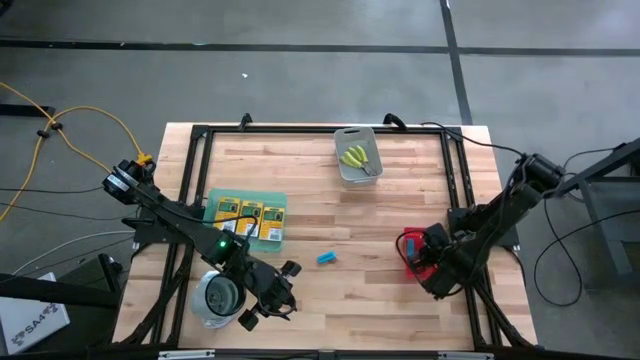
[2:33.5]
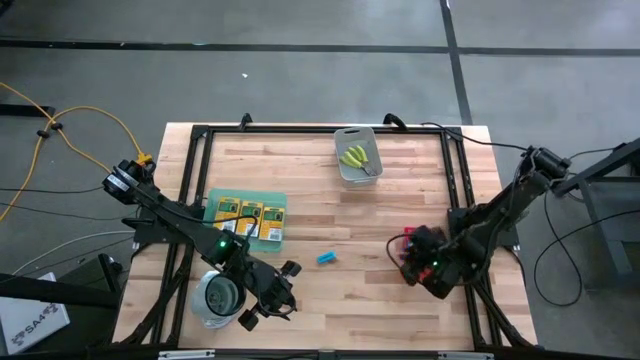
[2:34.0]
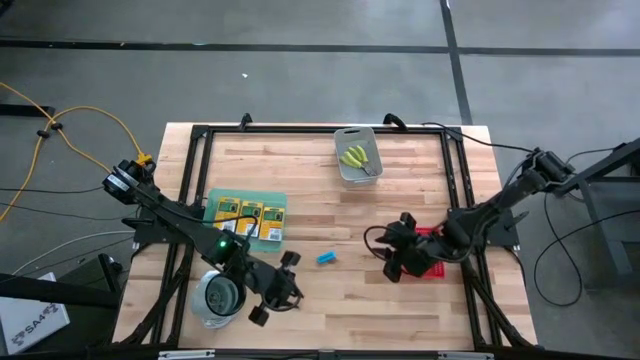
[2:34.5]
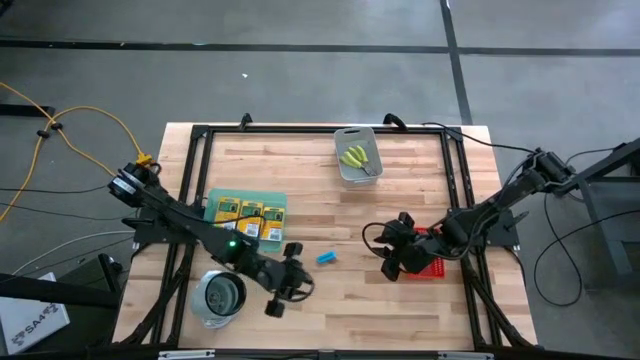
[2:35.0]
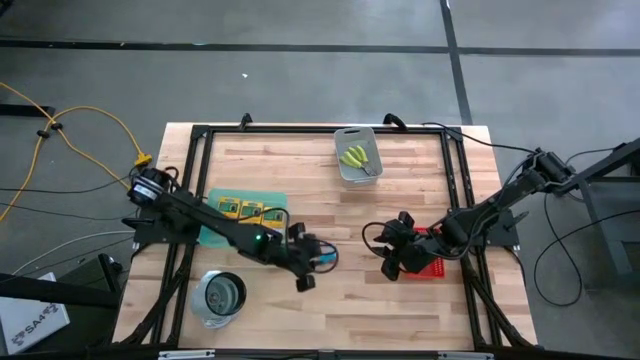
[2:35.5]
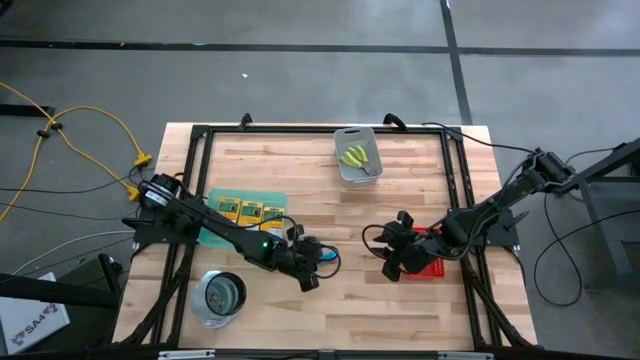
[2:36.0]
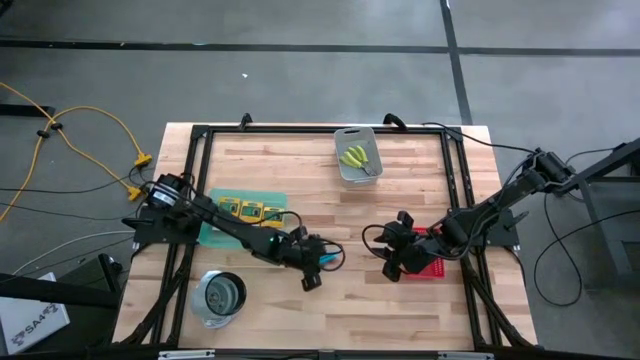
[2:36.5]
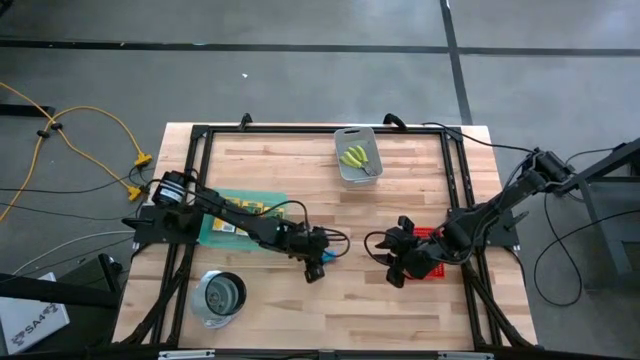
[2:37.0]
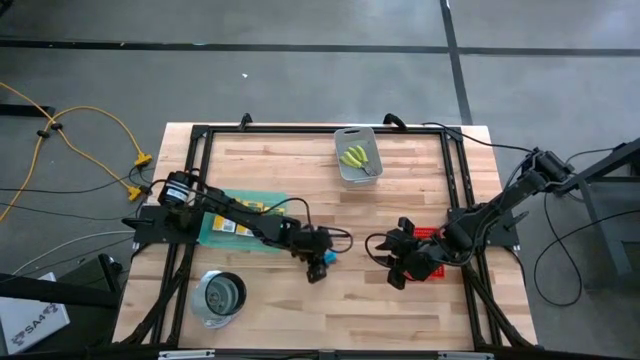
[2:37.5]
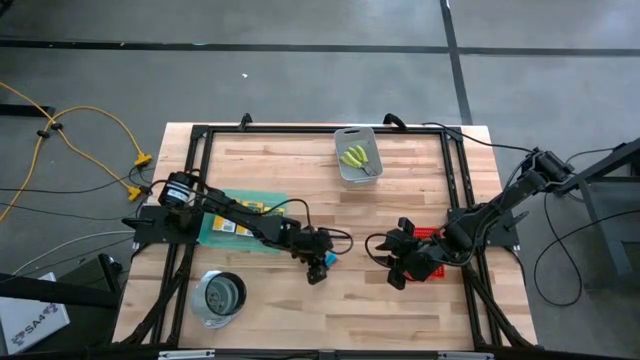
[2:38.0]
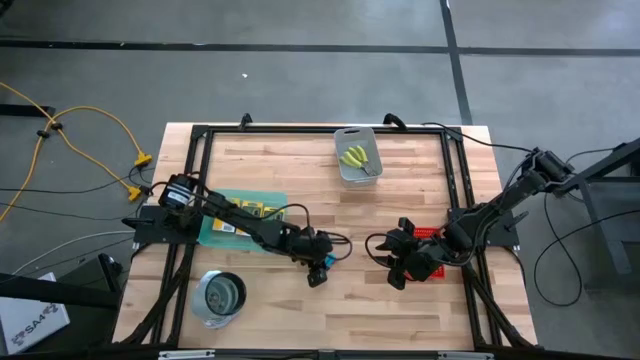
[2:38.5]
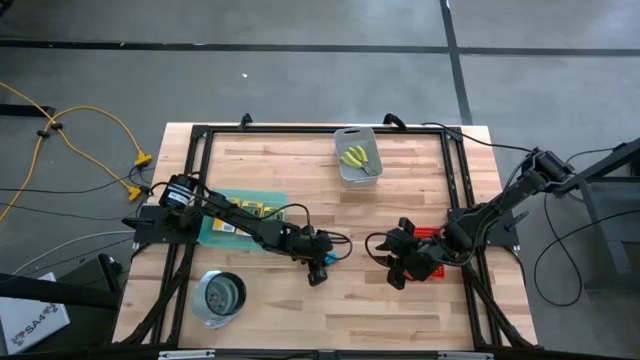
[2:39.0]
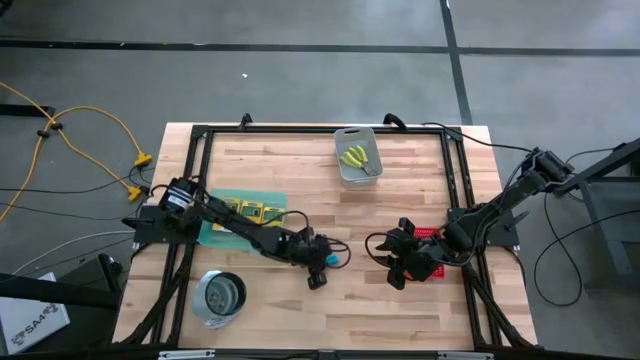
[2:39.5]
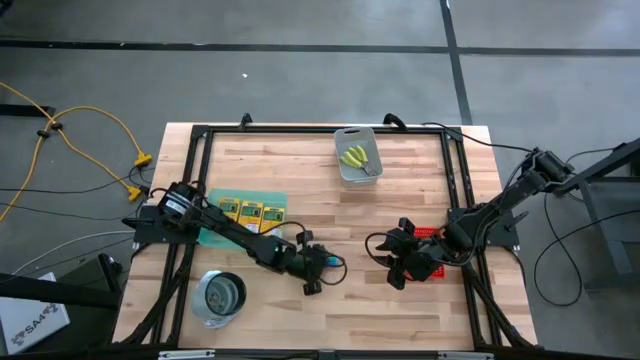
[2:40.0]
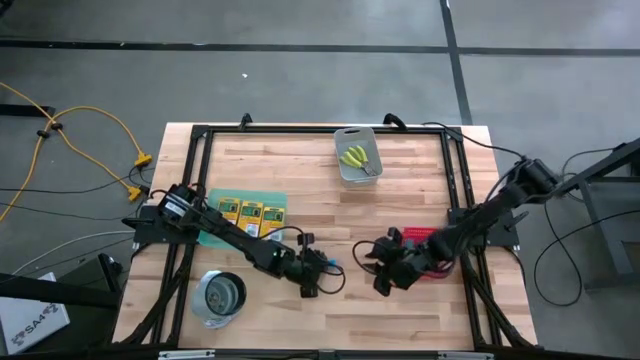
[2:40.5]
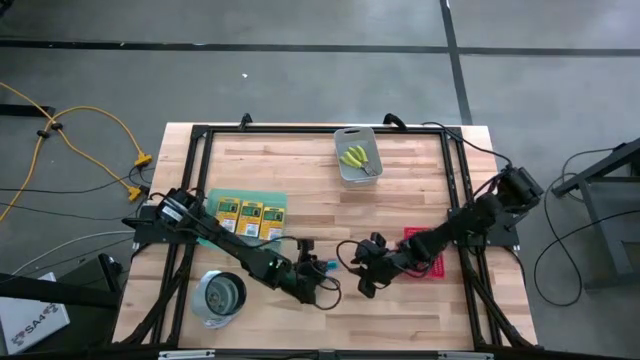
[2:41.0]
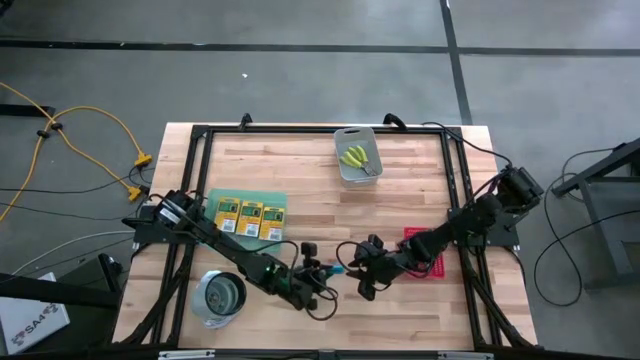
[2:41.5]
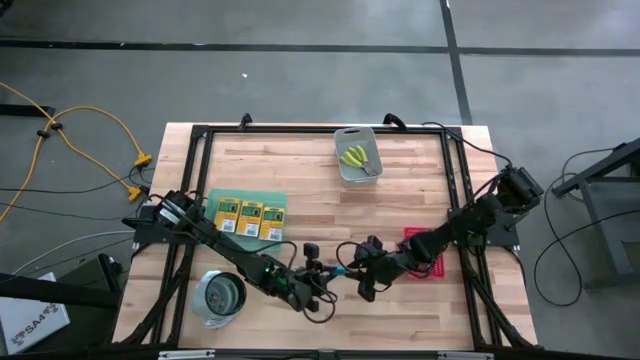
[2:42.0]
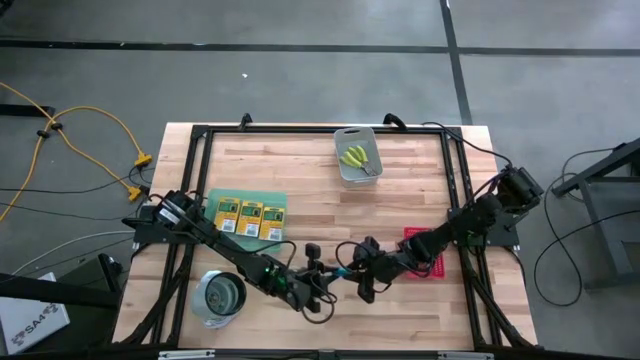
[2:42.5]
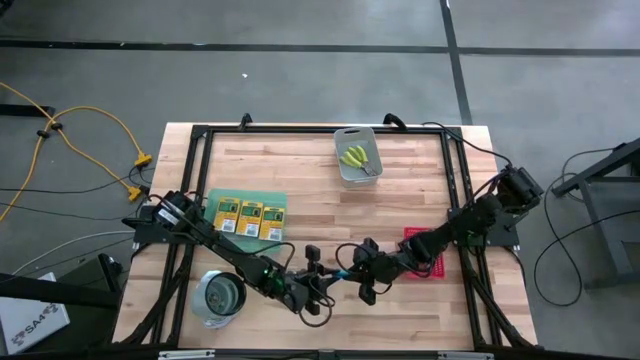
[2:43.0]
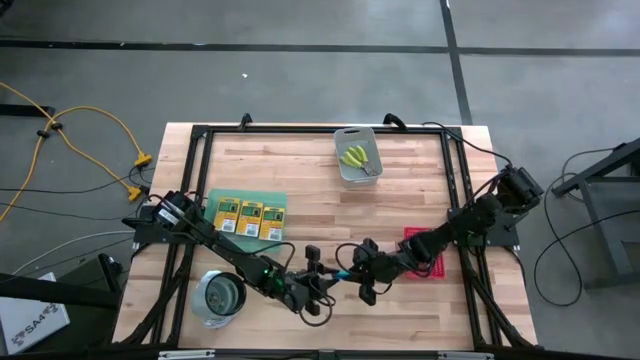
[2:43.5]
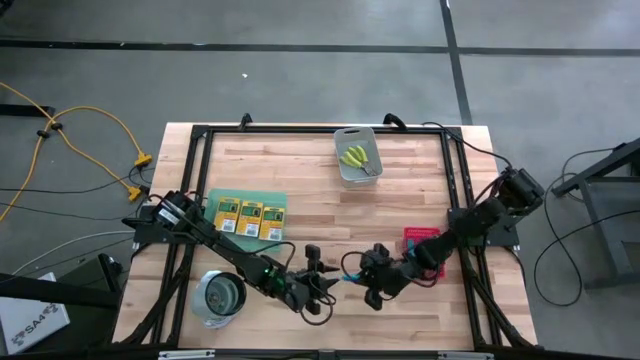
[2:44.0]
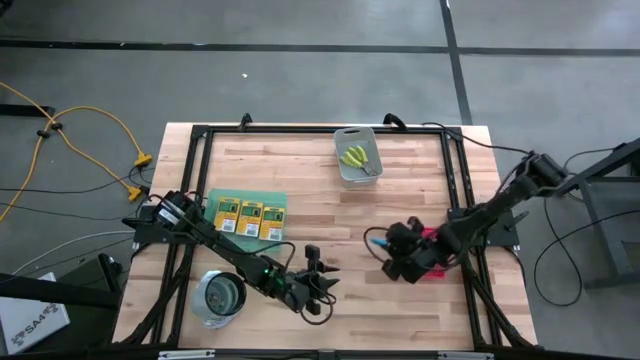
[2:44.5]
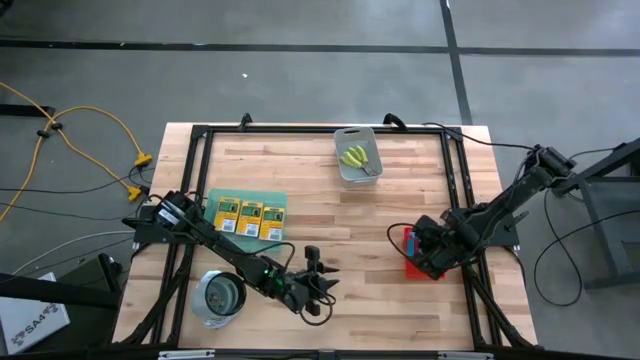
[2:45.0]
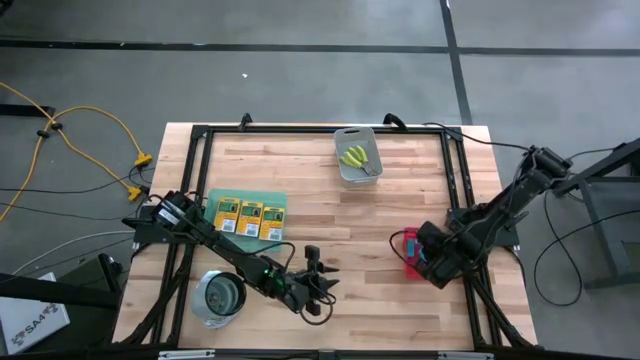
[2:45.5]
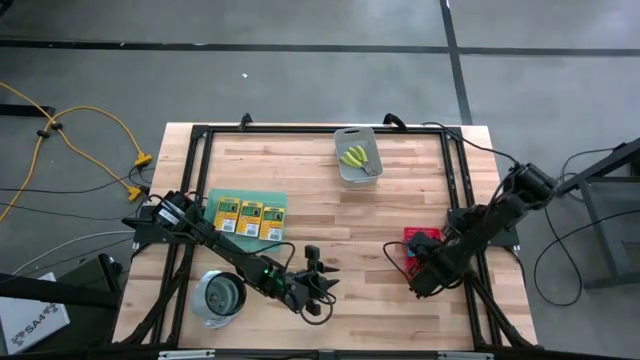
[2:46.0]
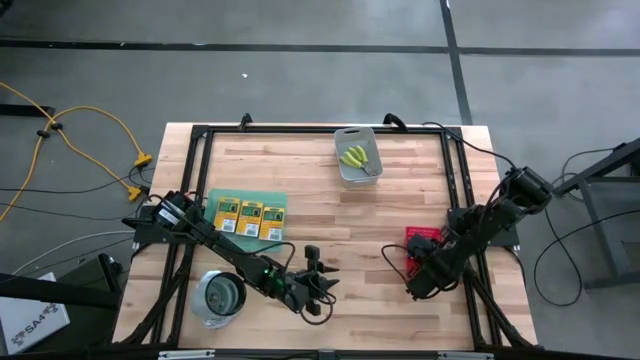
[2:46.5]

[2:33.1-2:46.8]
Task: Pick & Place School Supplies
Put the blue eraser into the red bin

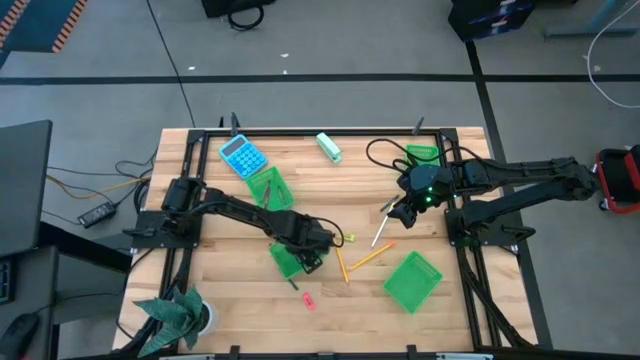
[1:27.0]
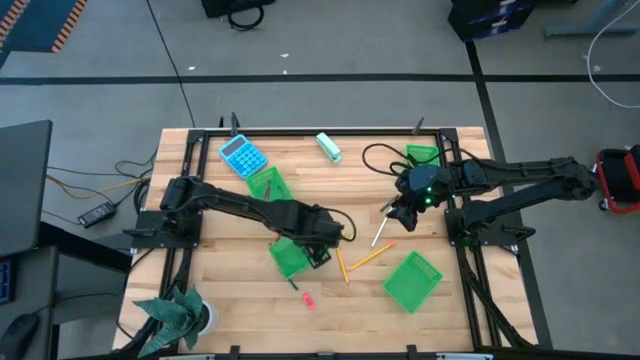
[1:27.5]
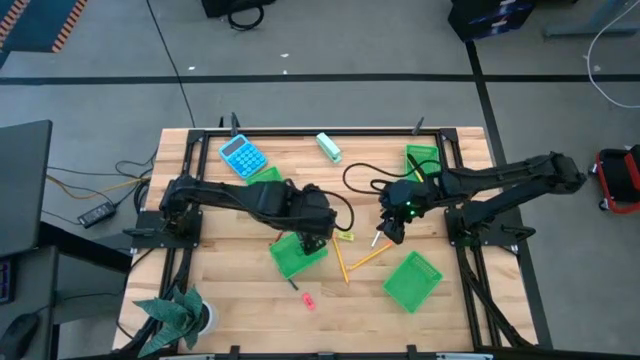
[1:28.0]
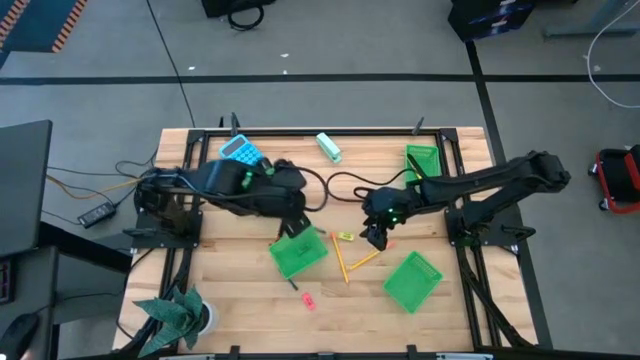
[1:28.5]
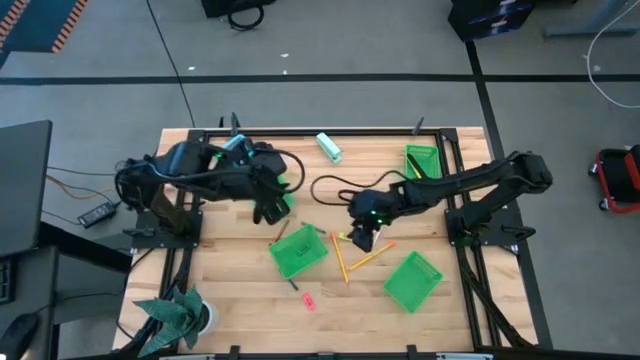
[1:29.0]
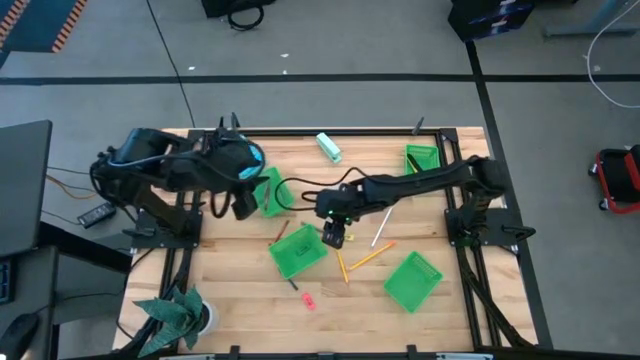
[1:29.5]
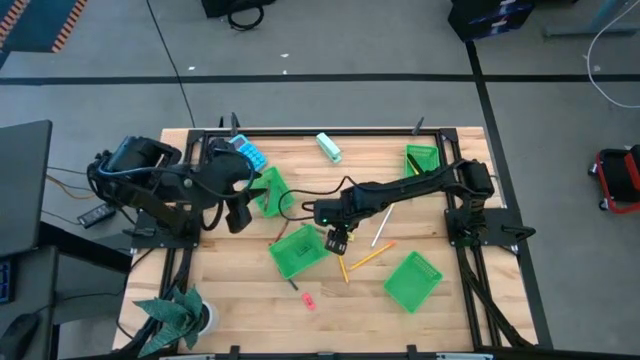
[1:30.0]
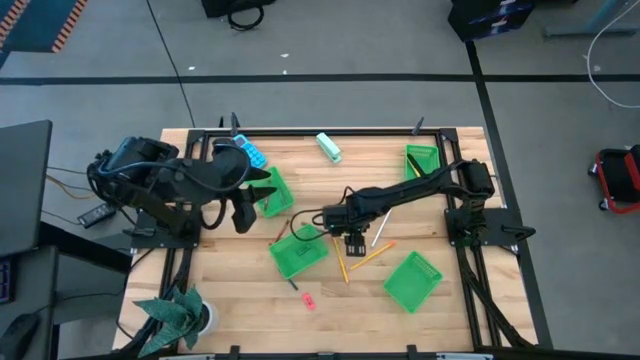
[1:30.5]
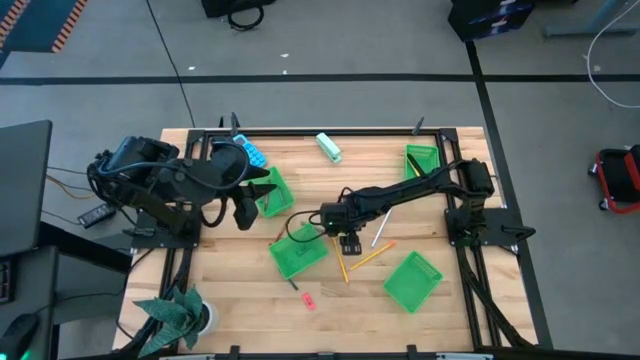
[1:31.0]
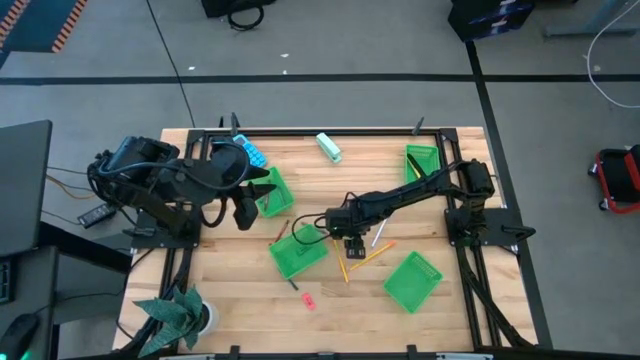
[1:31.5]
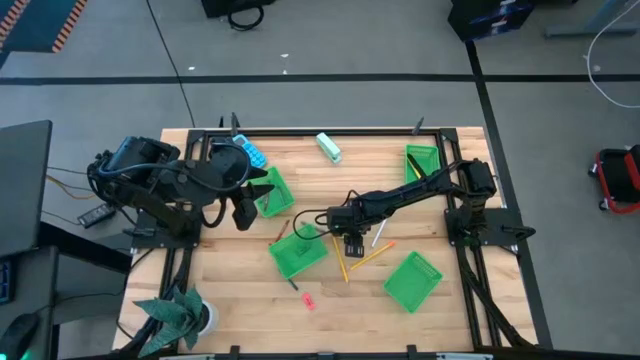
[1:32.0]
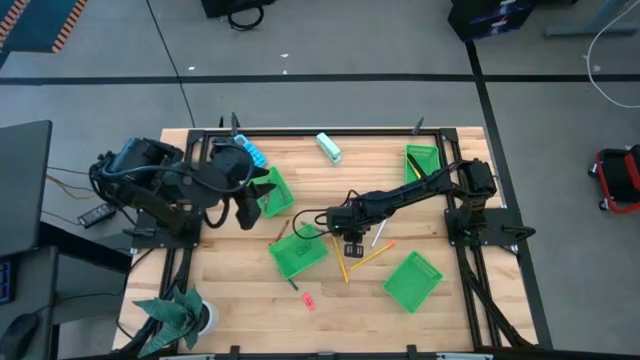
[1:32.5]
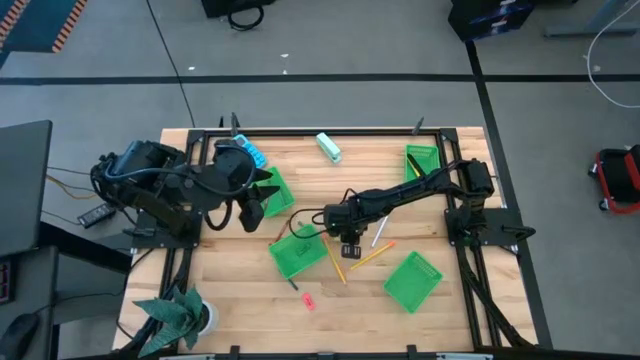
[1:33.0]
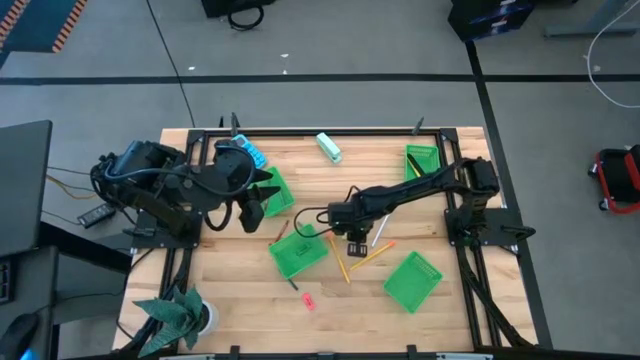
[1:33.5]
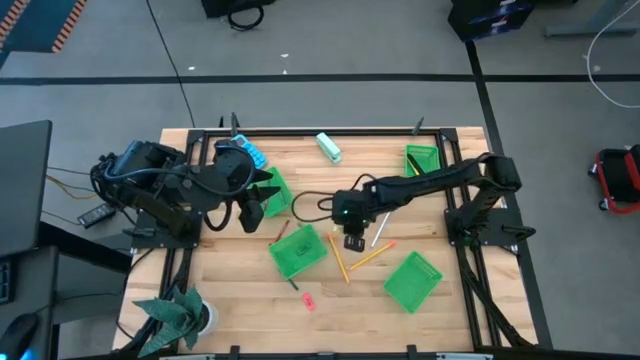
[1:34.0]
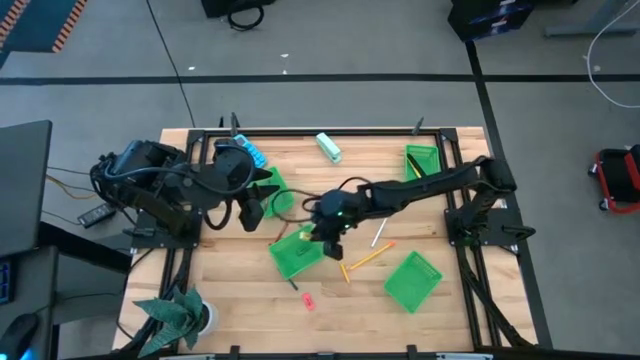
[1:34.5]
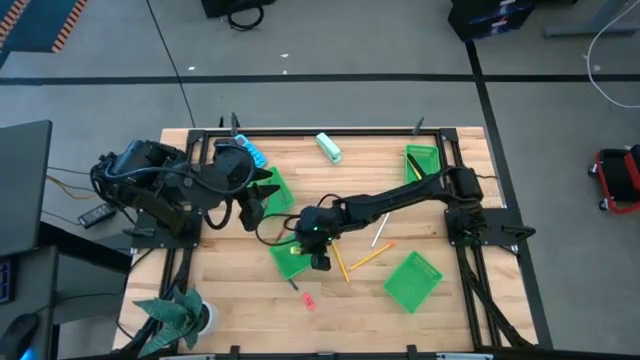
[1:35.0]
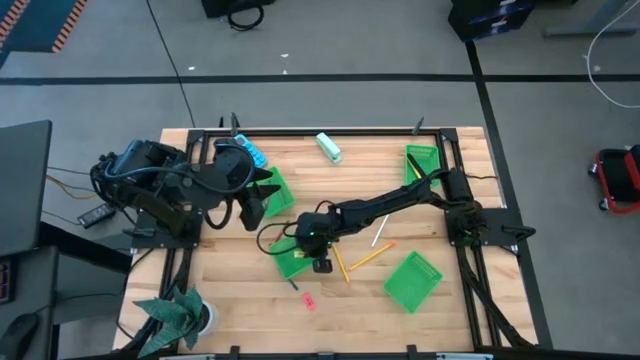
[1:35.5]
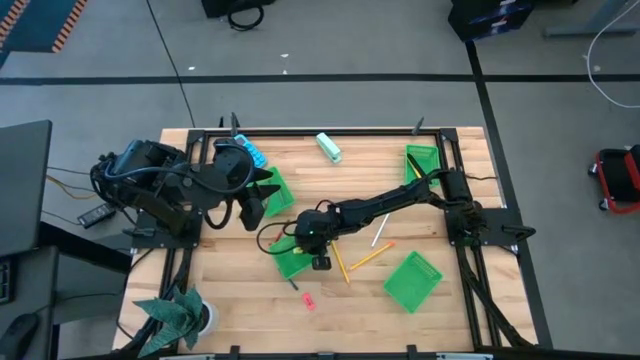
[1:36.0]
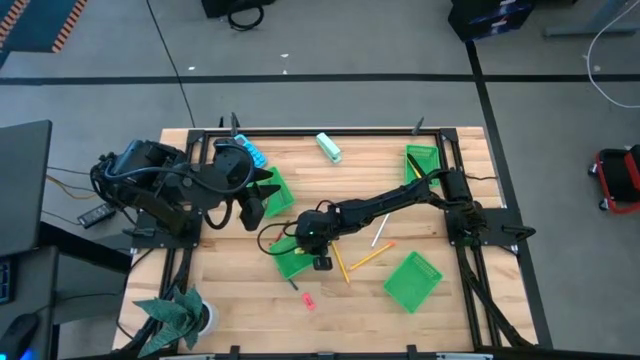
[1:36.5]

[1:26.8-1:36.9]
Task: Sort crayons/erasers/pens/pencils in bins
Put the yellow eraser into the bottom left green bin
